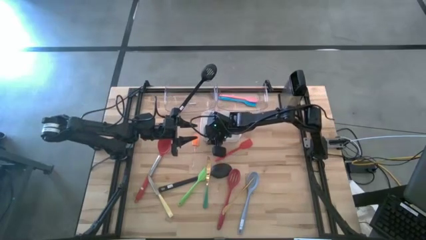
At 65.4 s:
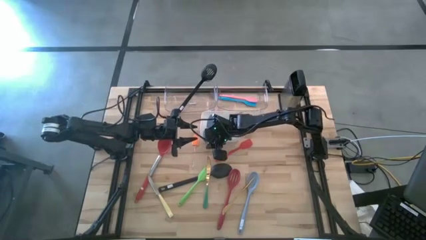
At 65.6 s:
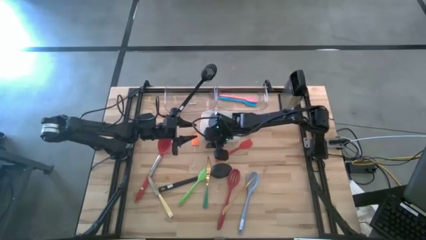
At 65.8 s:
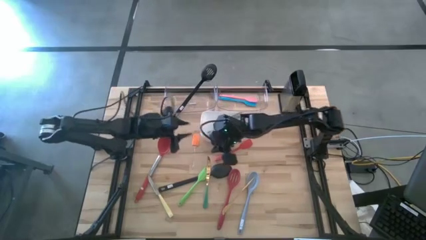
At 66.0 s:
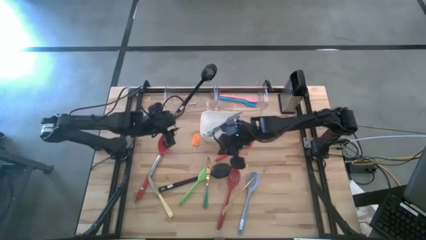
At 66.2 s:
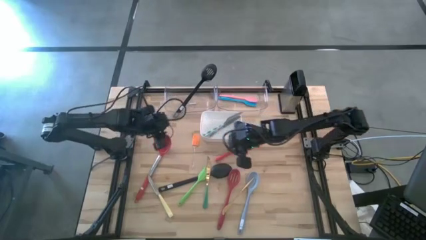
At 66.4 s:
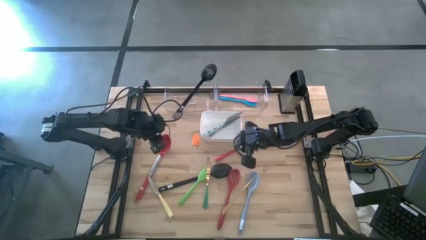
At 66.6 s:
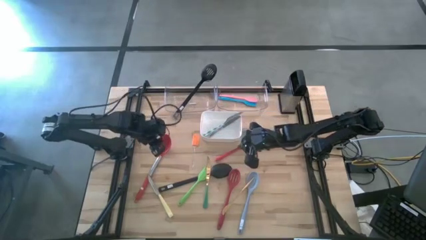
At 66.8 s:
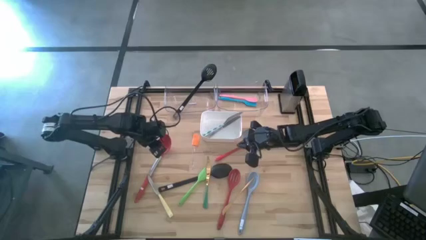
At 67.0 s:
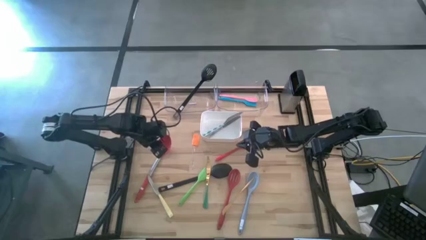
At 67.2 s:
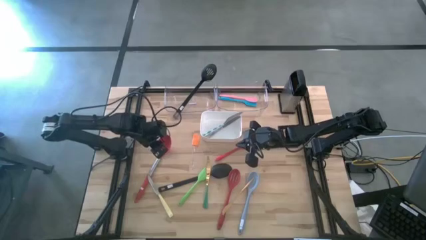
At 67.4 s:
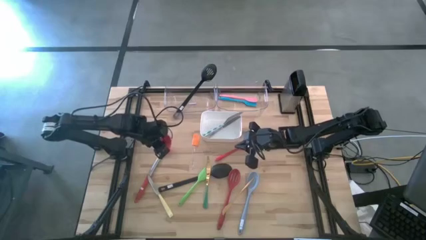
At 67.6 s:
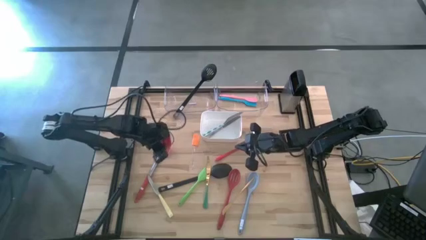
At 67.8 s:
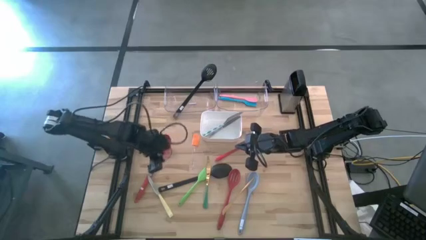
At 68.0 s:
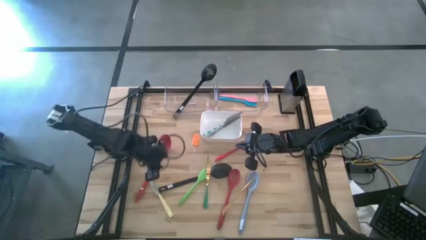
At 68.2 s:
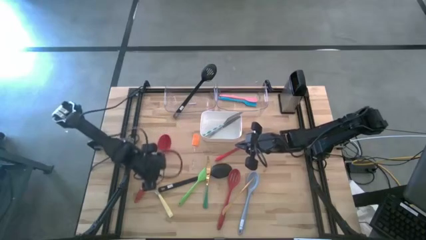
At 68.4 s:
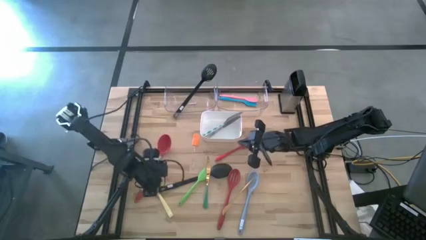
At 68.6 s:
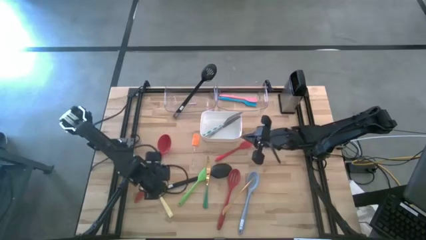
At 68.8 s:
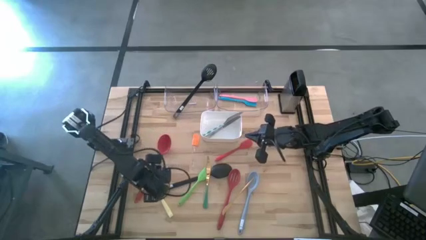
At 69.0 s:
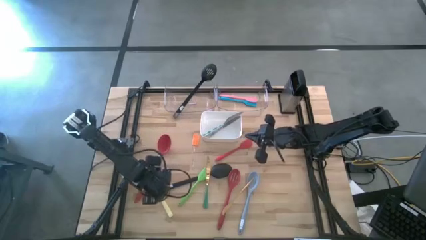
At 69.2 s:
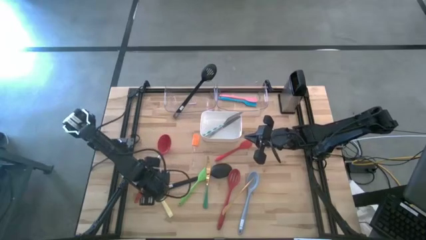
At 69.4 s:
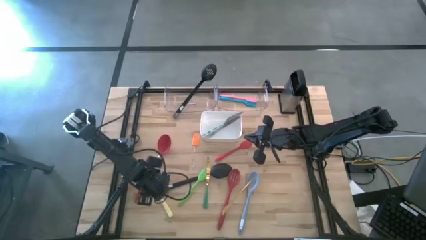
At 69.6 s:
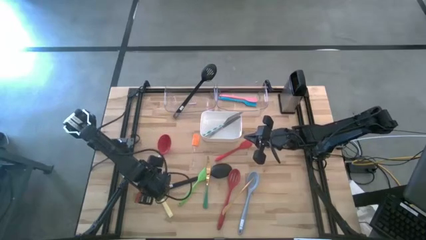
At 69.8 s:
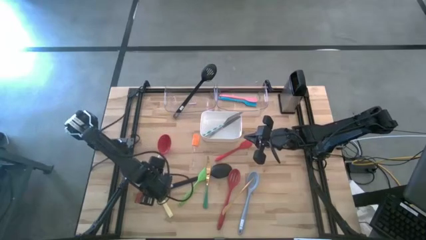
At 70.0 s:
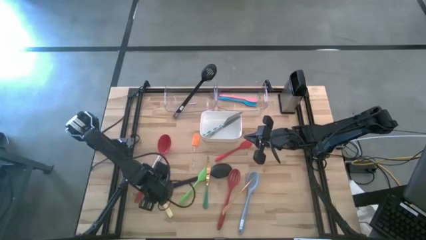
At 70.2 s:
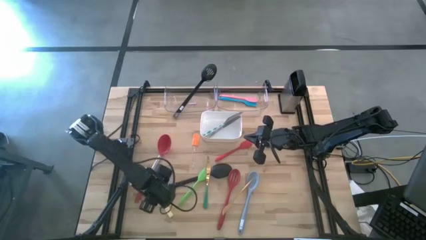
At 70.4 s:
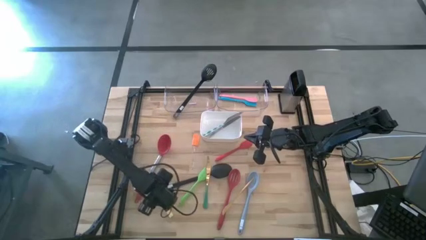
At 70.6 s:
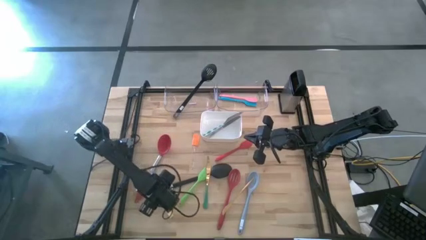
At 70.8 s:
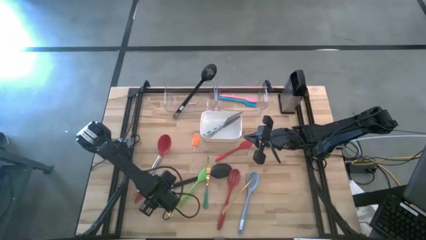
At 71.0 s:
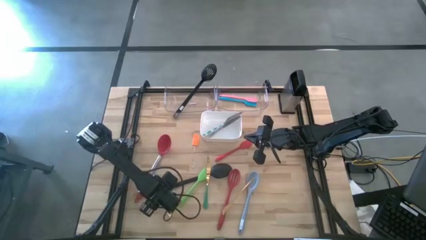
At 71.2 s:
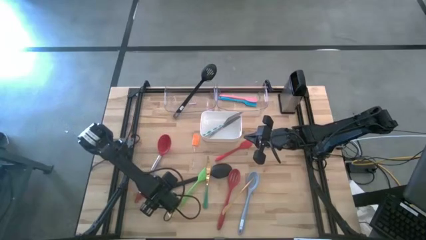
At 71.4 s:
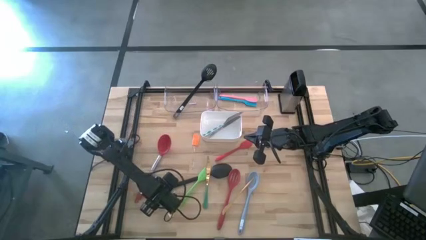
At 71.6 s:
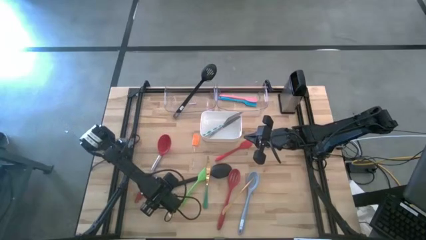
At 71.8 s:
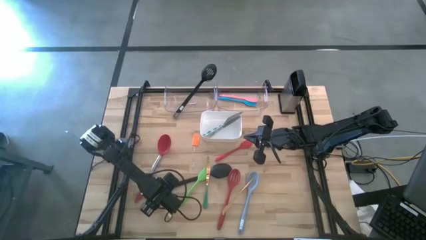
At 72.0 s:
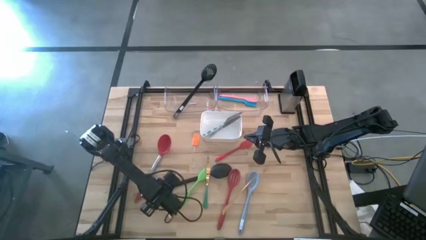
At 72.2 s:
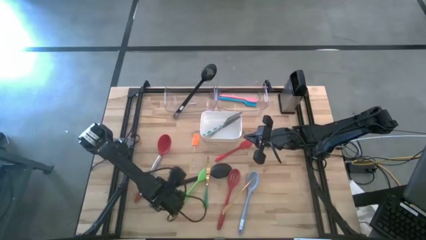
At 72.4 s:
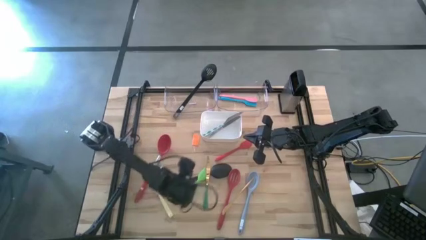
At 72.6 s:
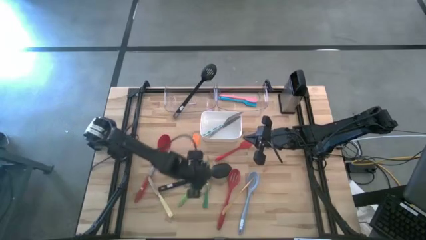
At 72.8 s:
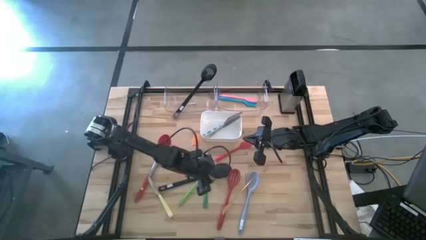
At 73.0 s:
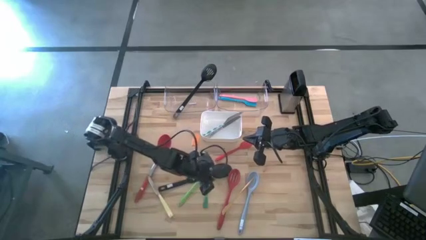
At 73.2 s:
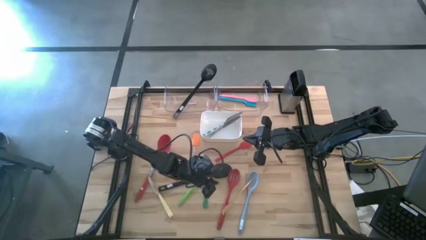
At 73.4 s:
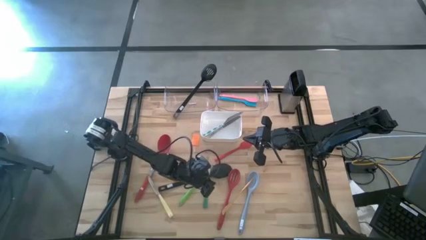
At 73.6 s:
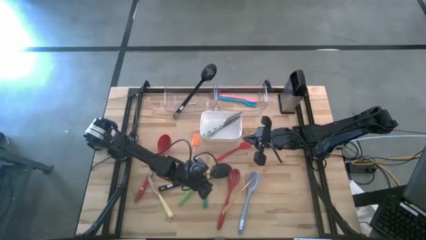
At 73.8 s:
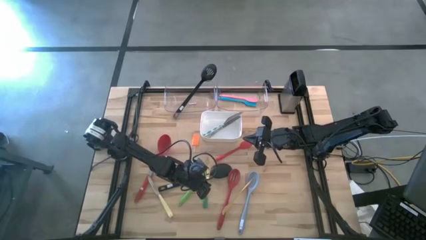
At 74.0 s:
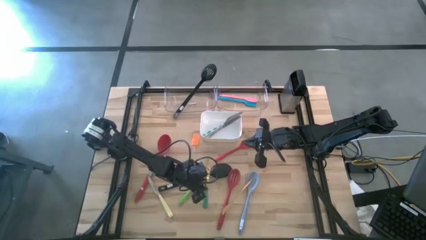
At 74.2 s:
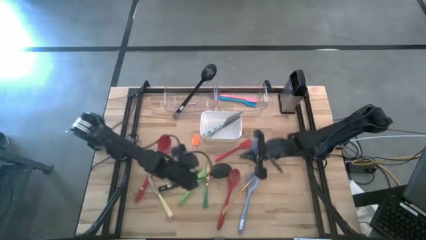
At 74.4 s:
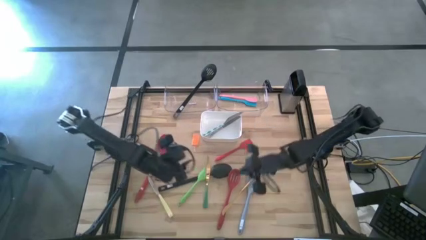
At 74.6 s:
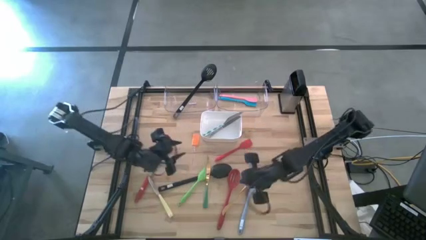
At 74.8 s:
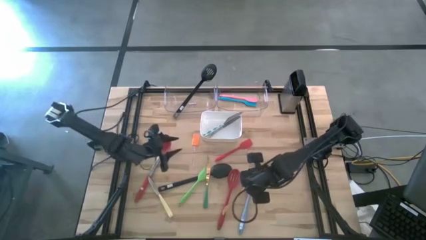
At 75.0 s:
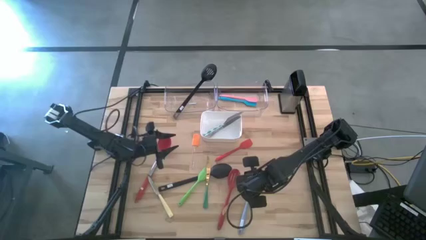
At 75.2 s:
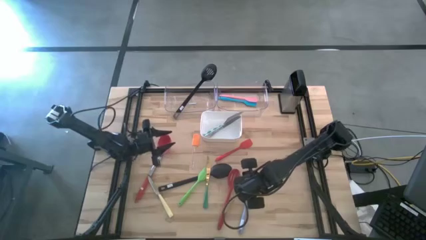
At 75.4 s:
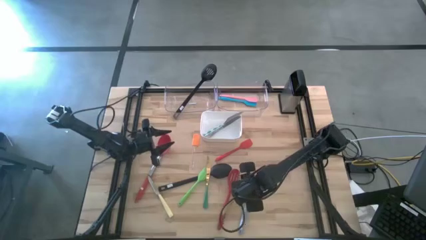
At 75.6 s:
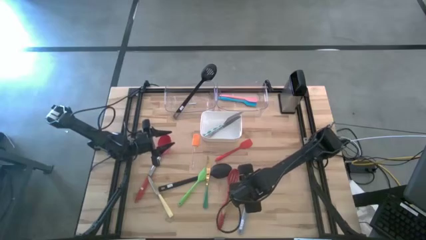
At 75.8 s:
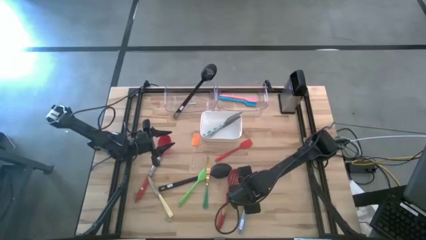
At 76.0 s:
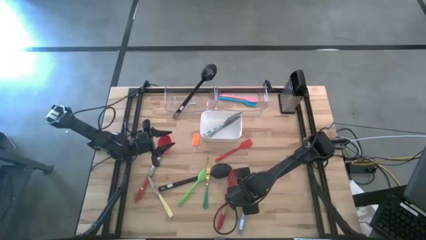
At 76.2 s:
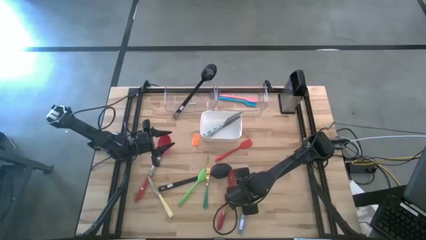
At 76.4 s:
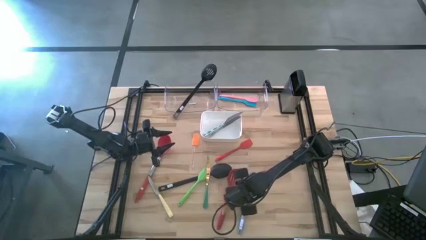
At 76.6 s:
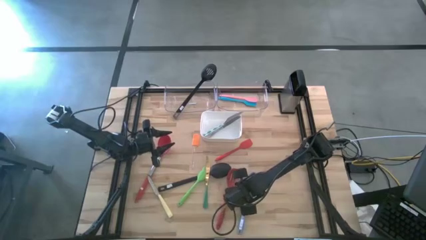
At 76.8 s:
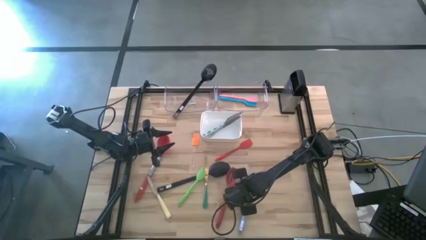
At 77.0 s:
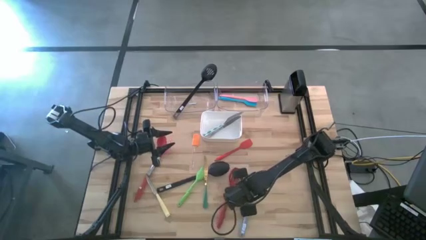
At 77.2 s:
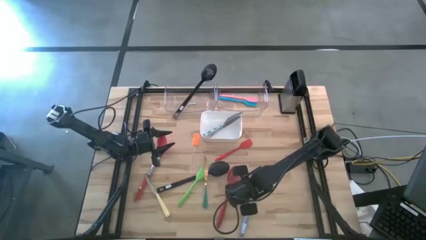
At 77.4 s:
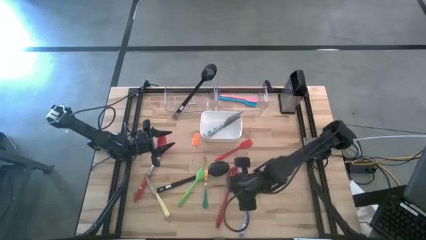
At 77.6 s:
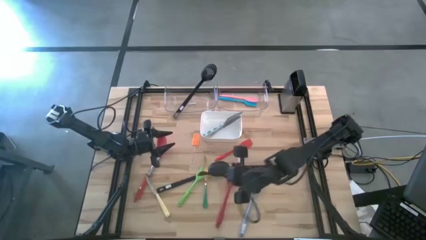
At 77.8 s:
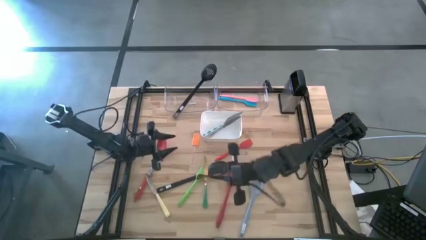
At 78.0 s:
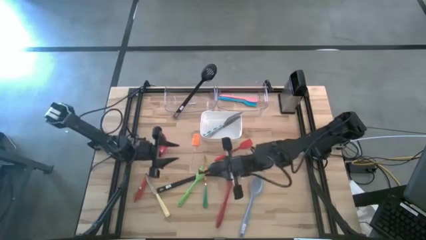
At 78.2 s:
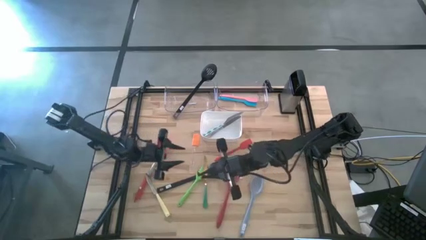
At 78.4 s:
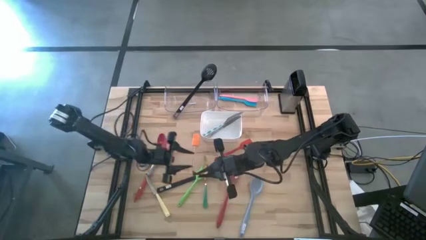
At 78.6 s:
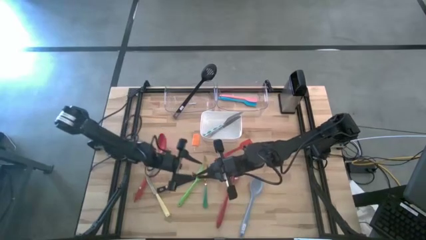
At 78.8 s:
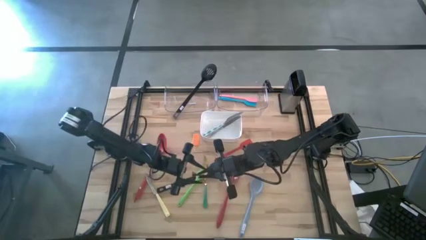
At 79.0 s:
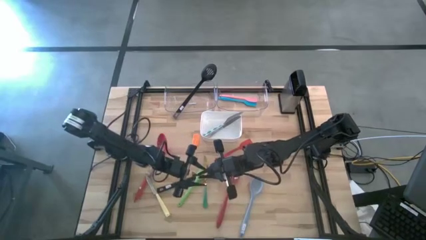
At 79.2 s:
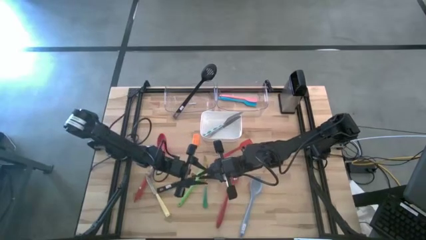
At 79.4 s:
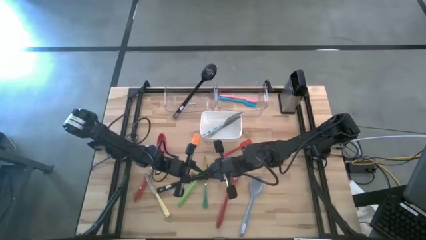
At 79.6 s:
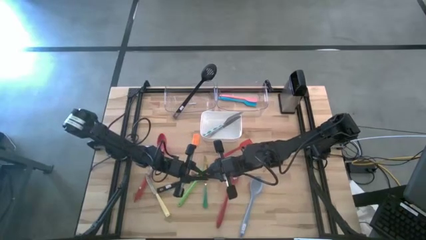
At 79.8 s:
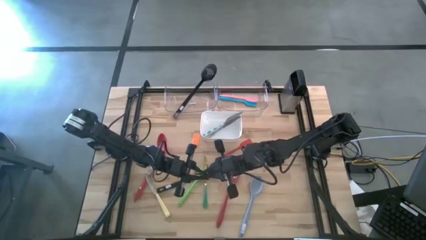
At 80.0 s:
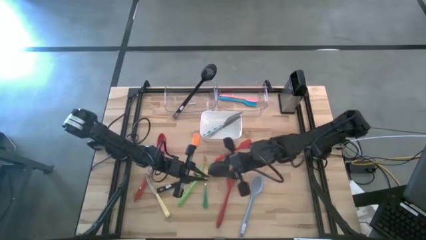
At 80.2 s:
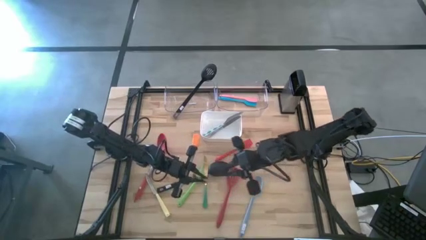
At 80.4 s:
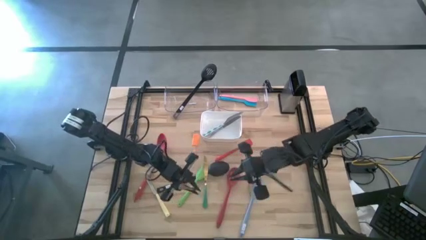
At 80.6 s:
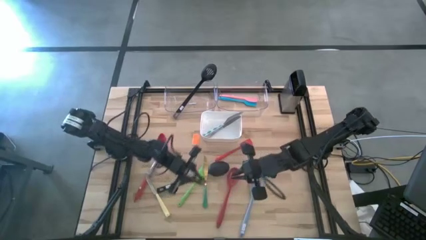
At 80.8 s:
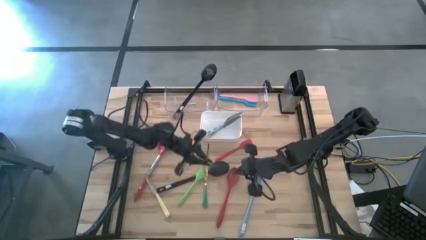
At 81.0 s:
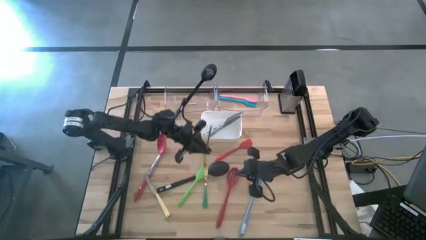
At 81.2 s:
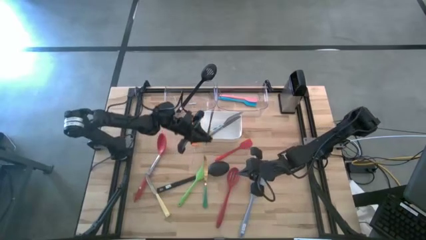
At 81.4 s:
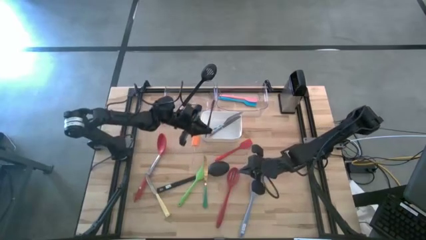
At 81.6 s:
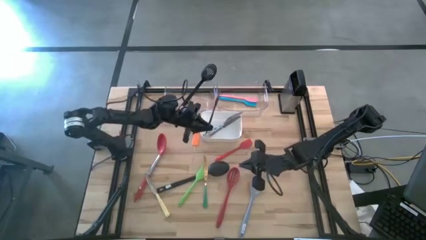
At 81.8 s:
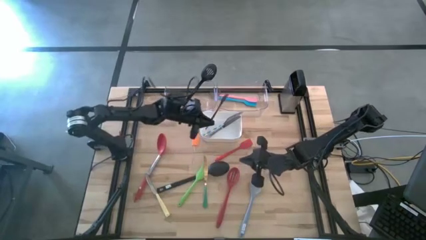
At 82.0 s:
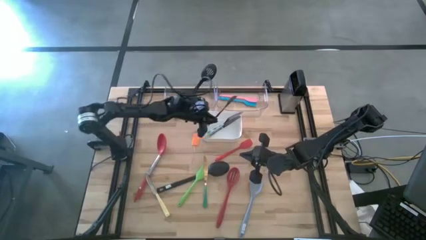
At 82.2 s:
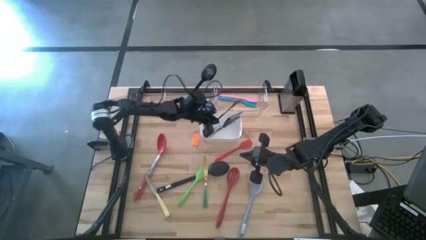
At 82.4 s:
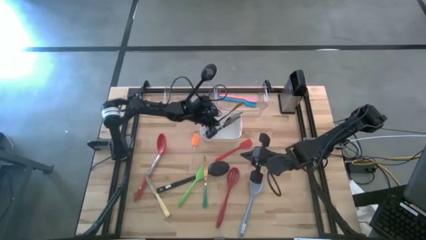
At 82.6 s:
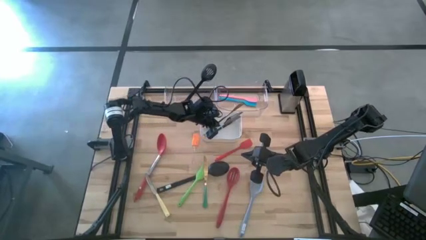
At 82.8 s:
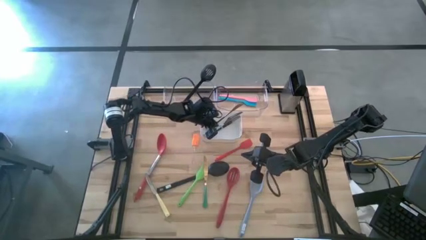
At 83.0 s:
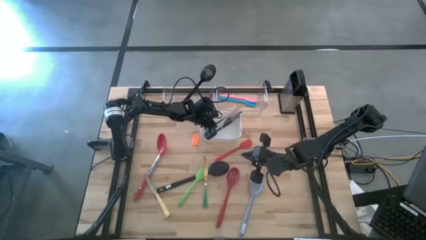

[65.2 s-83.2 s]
Task: Pick & Place Kitchen Items
Put the gold table knife into the white bin
